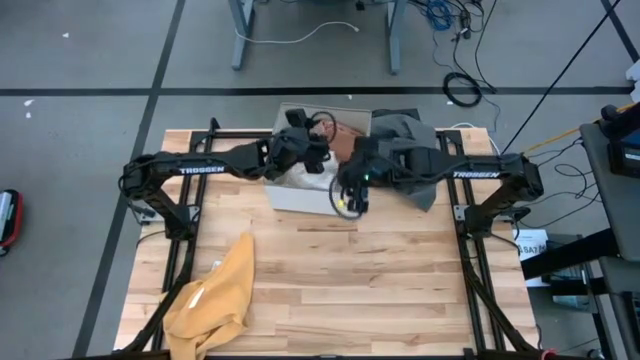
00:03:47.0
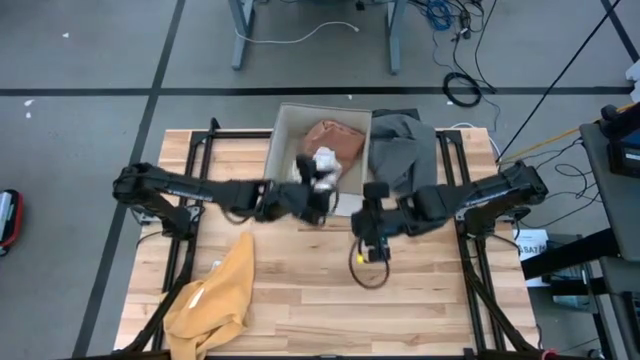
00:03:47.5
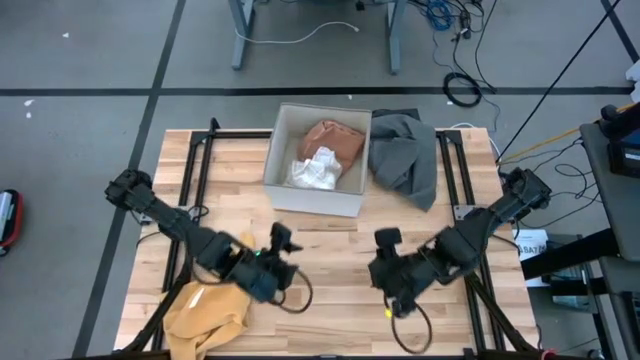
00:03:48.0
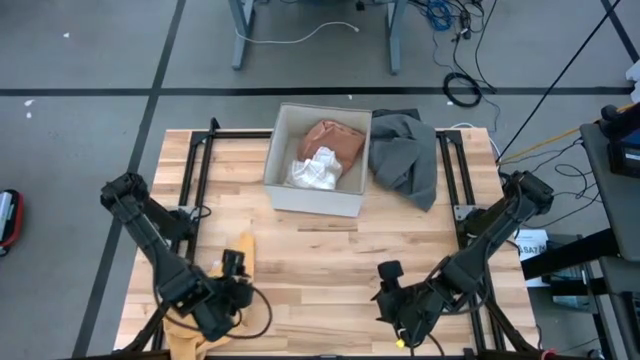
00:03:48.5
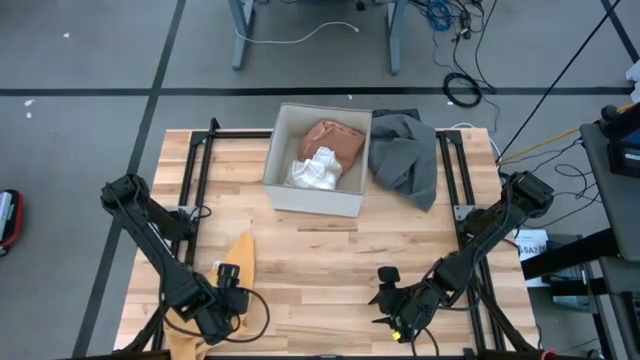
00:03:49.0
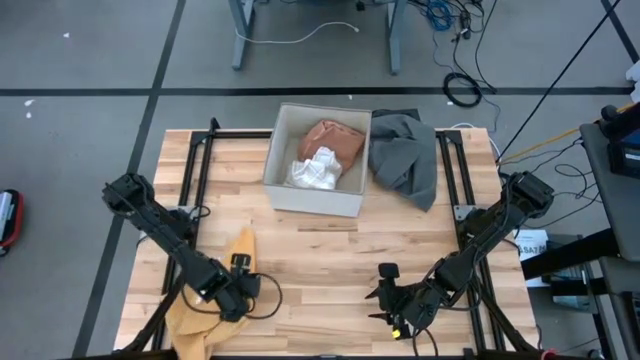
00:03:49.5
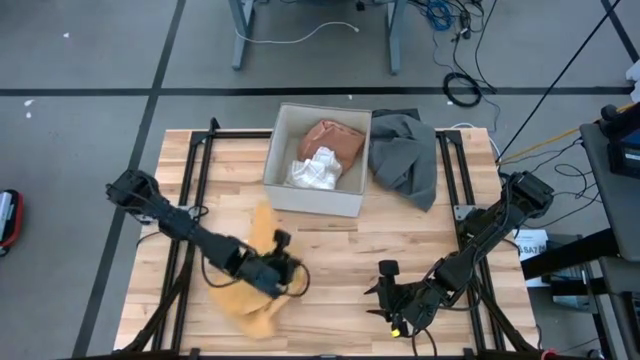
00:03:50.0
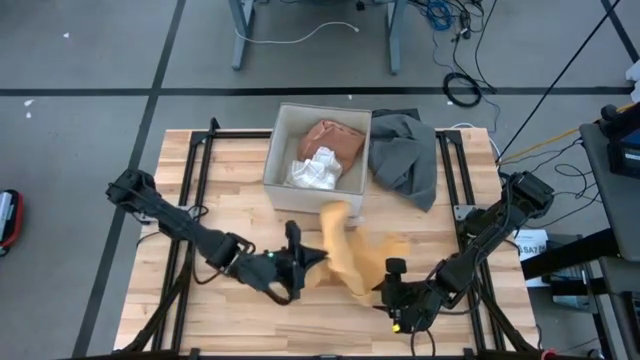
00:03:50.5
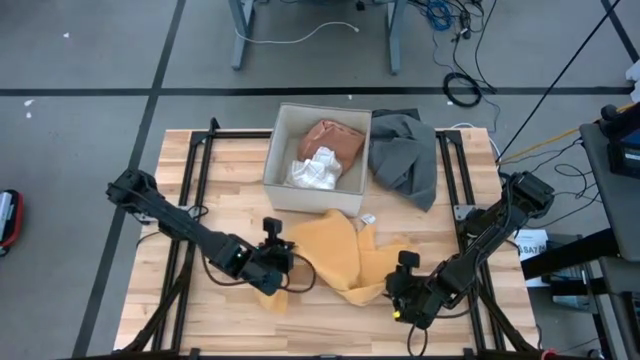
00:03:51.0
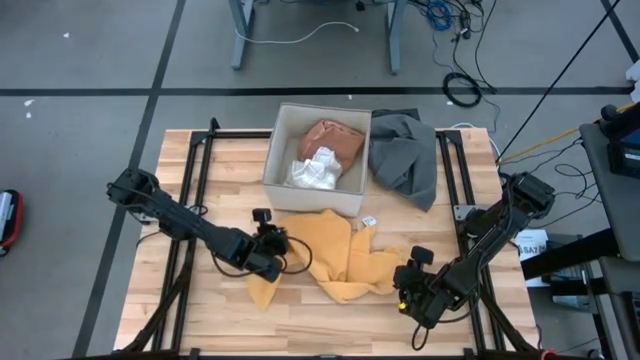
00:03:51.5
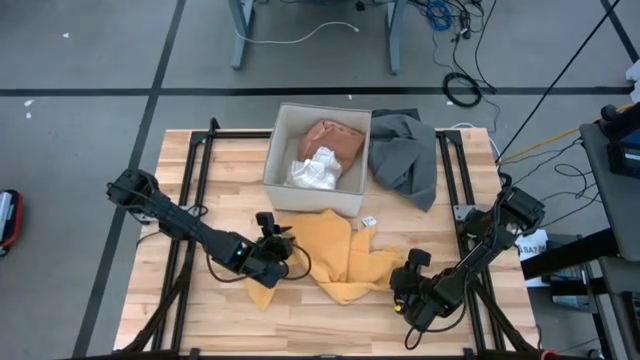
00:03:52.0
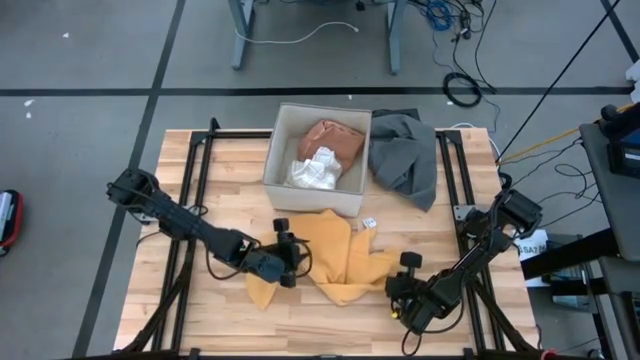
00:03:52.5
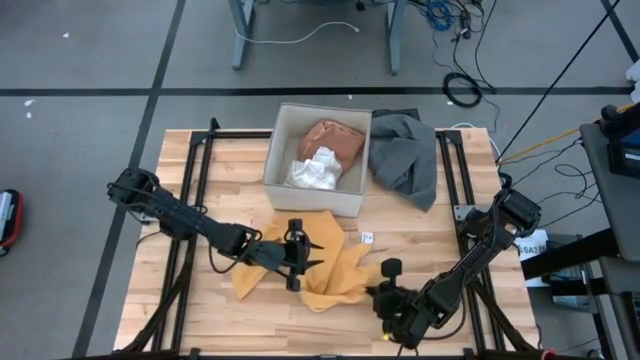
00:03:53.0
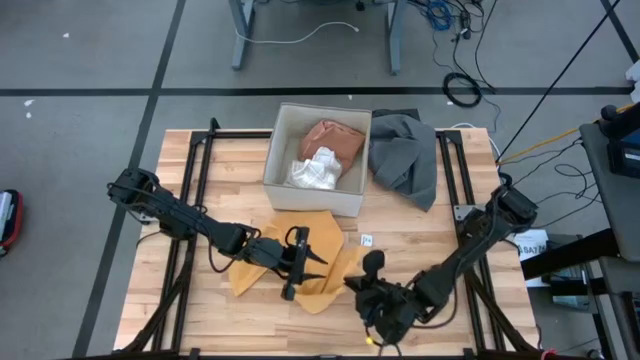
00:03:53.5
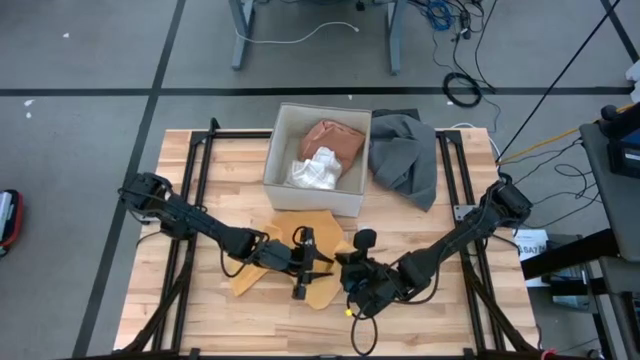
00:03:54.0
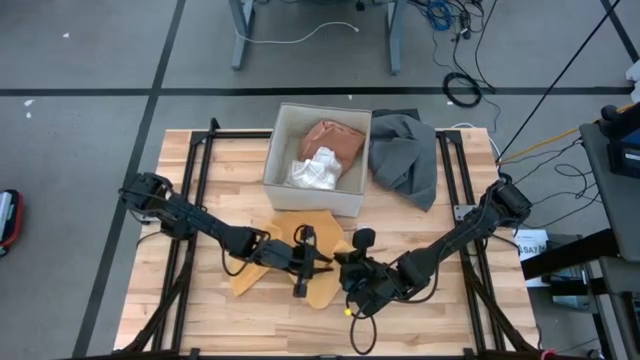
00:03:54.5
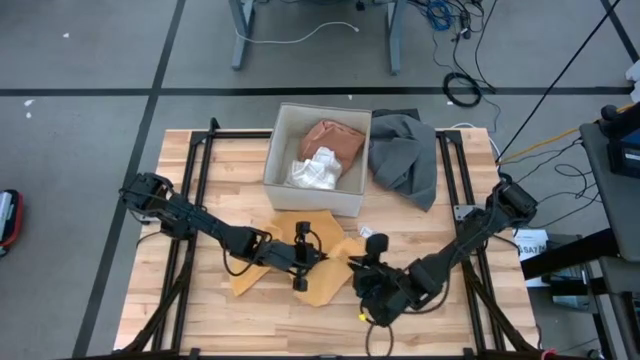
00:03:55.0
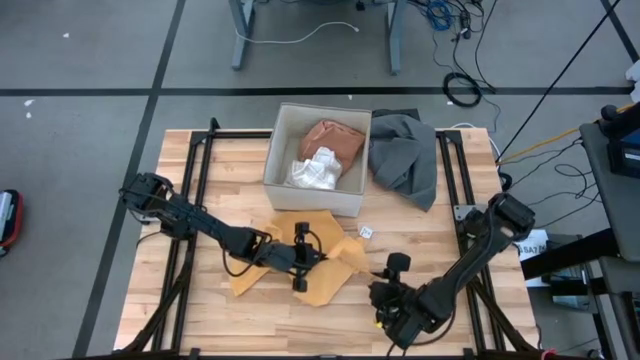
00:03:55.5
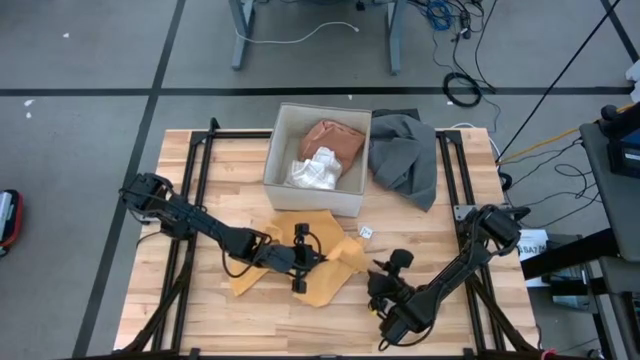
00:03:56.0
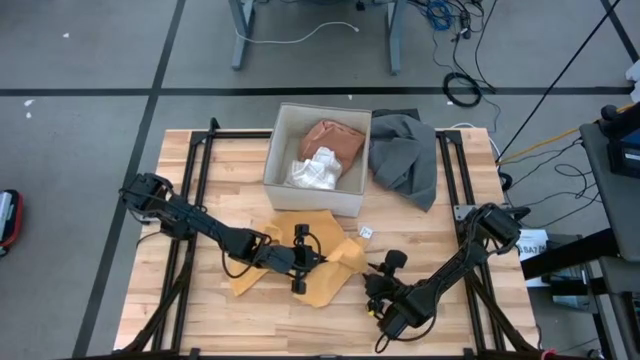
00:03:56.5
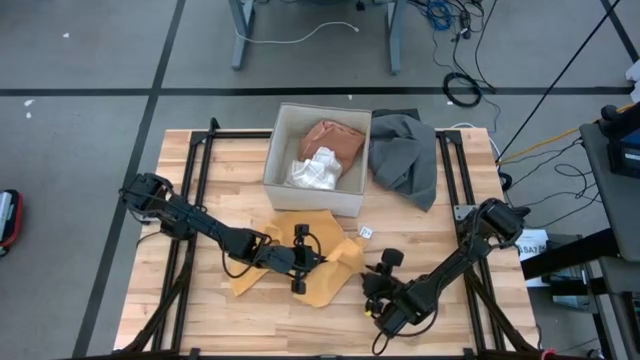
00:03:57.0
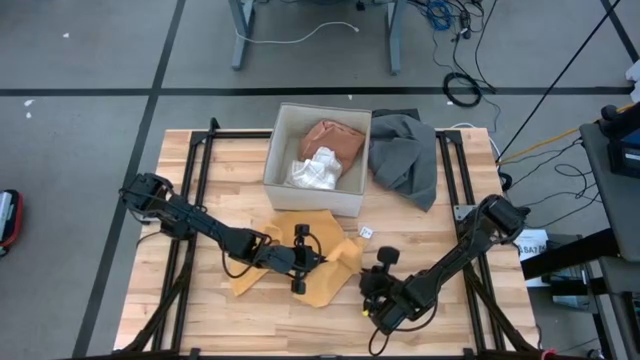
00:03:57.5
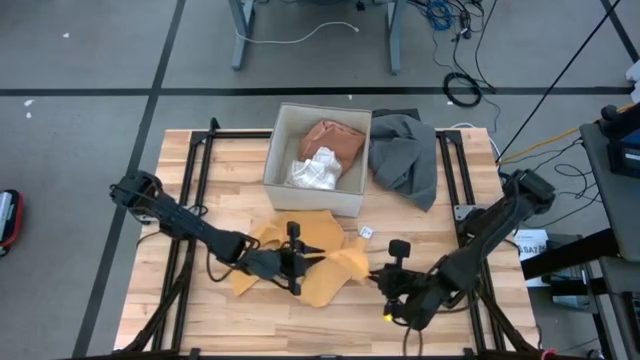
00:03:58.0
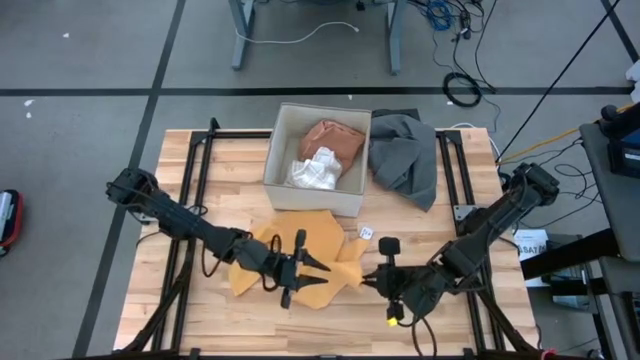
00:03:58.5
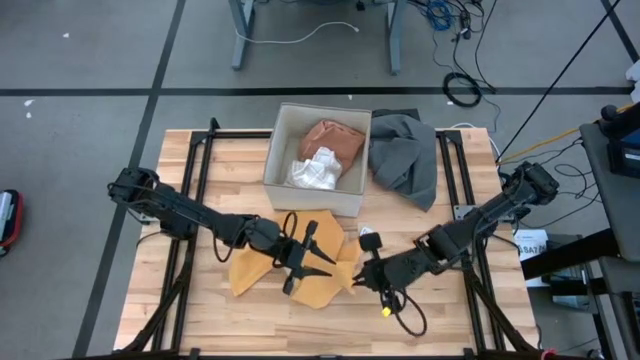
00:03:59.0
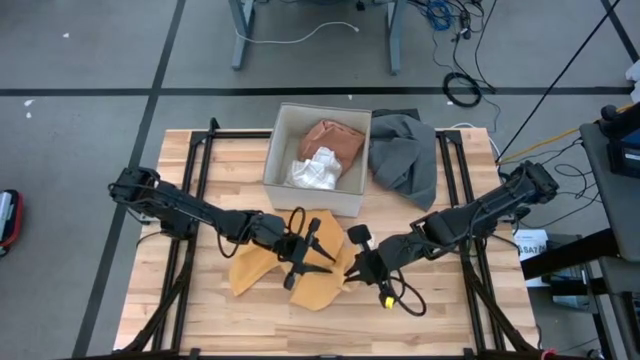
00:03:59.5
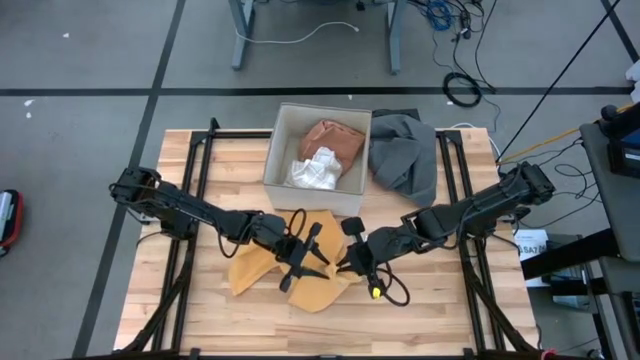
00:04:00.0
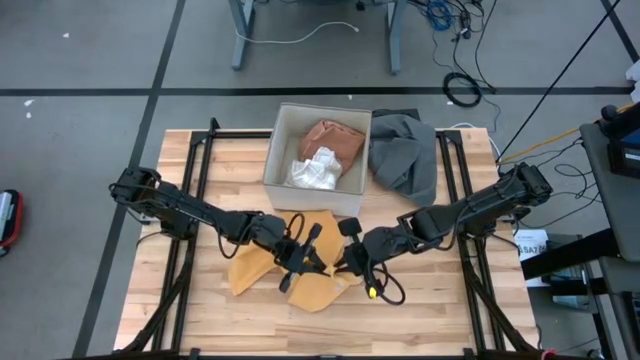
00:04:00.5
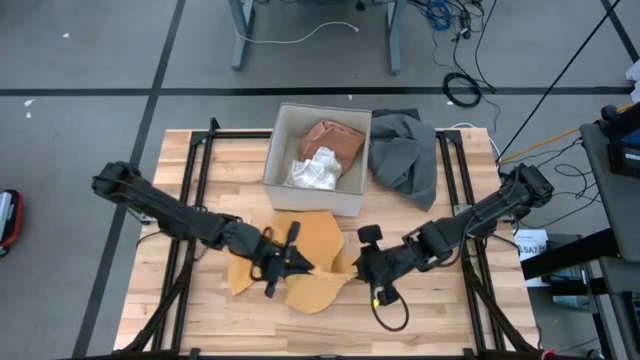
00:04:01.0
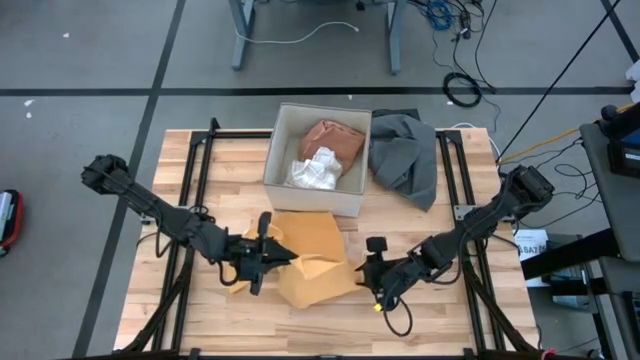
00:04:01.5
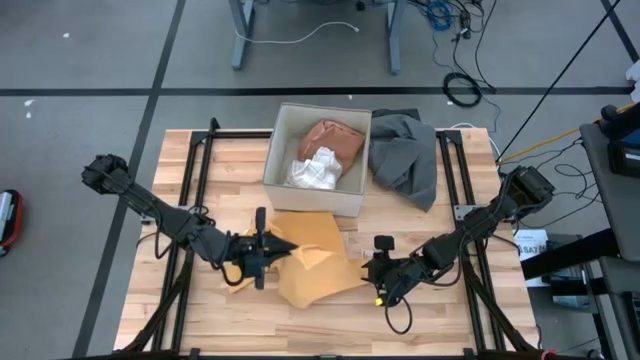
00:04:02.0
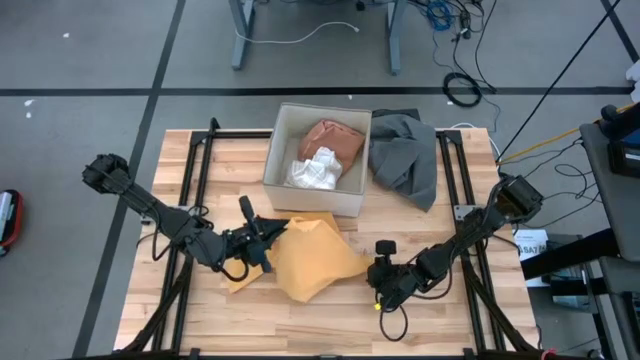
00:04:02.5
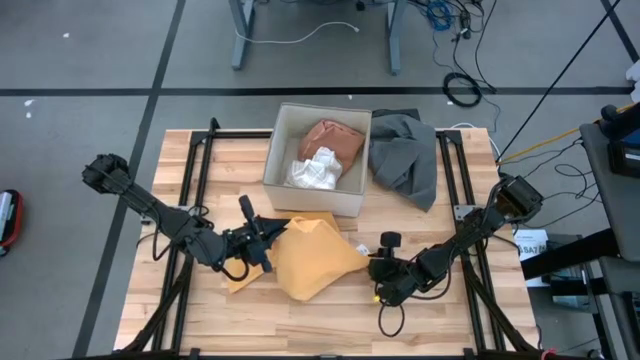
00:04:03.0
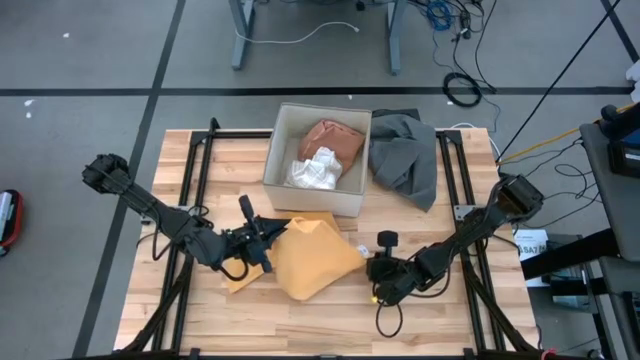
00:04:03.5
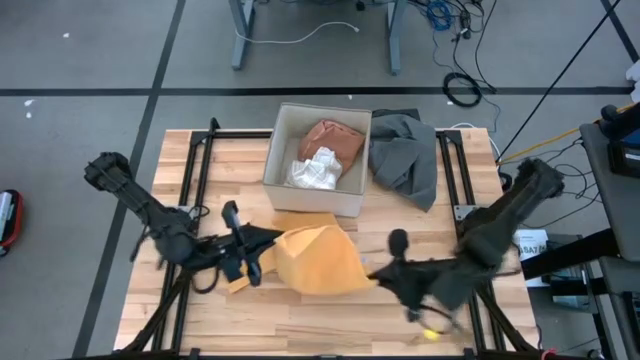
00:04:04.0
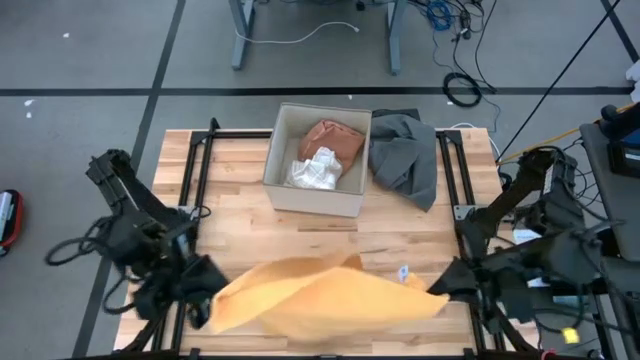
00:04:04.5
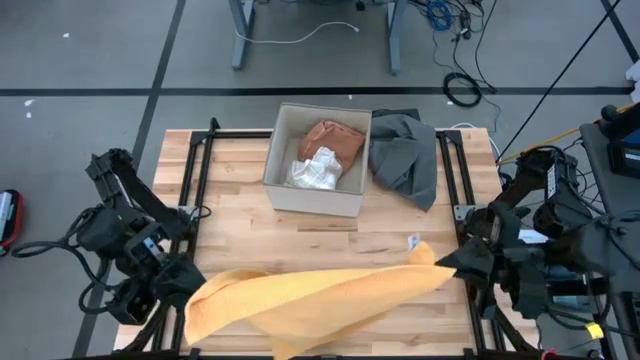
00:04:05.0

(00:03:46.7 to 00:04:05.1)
Task: Fold towel
Fold the orange towel
